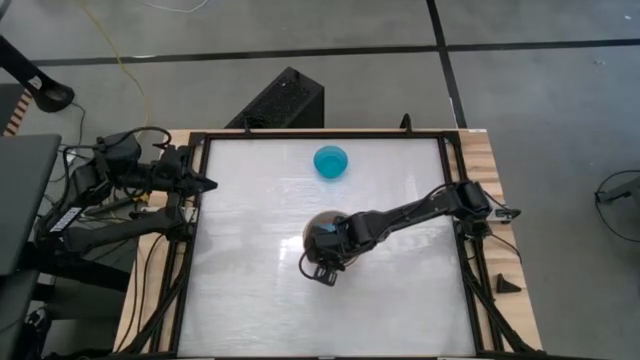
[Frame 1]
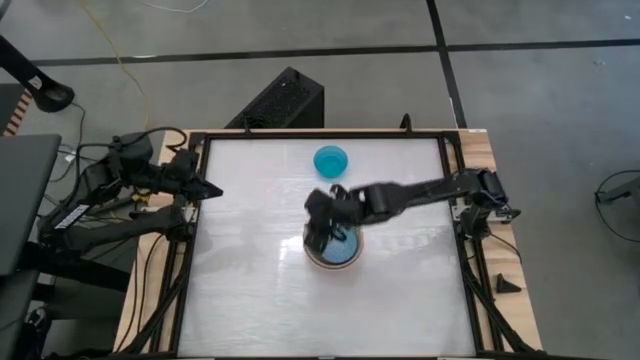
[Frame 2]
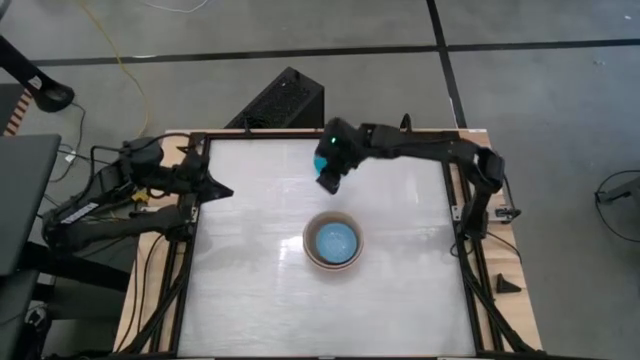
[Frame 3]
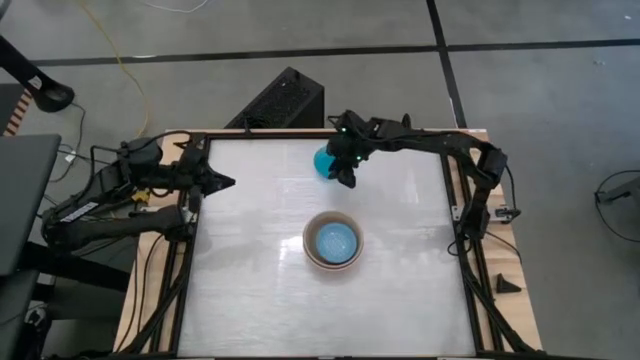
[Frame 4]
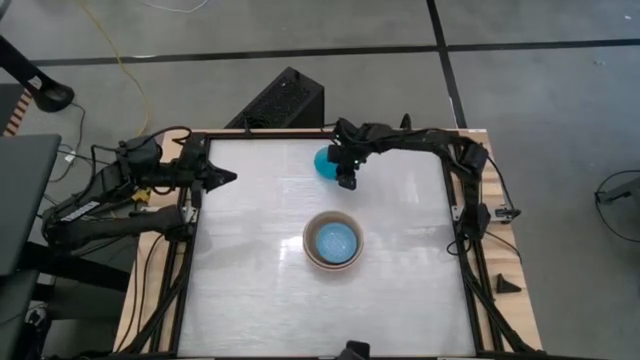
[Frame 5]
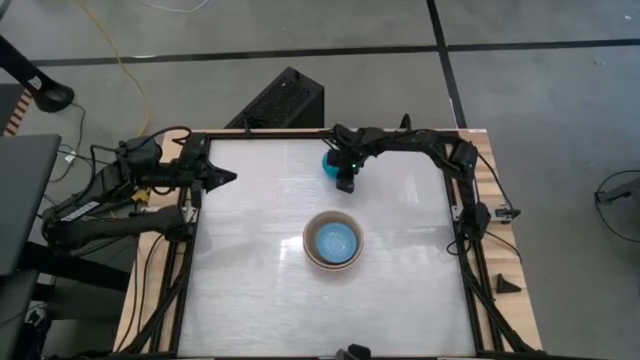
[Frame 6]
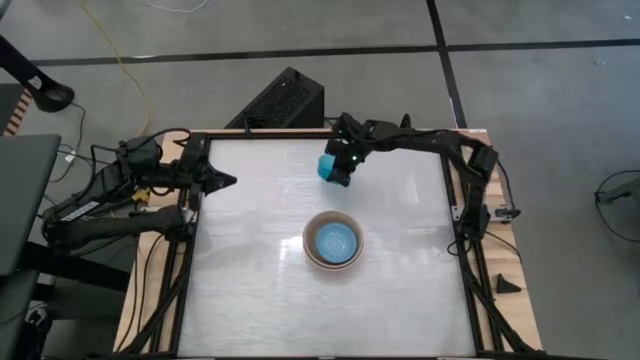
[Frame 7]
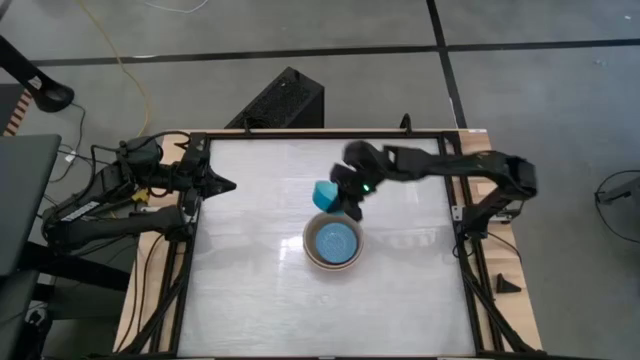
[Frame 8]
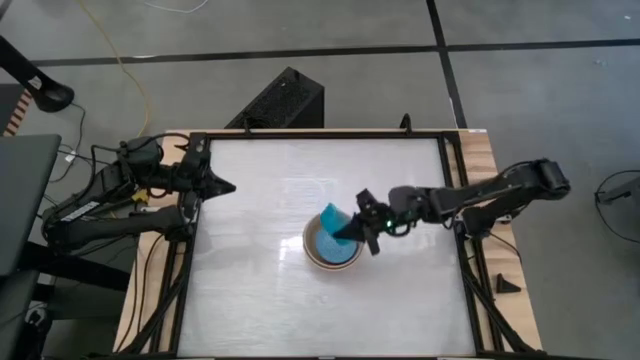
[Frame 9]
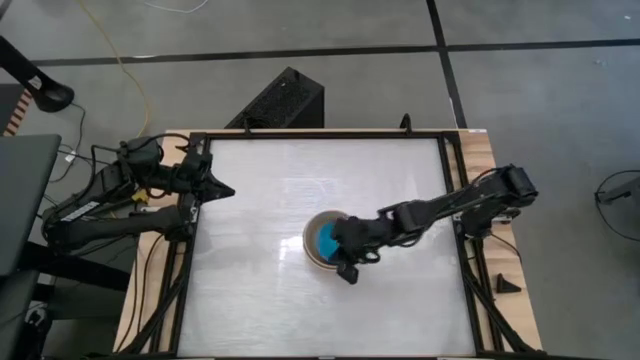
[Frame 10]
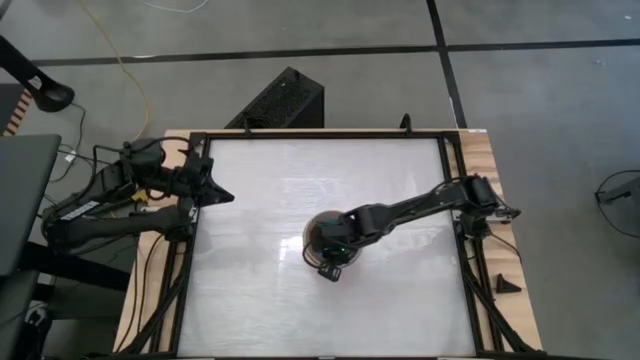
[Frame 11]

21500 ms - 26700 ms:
Stack the transparent blue bowl on top of the blue patterned bowl

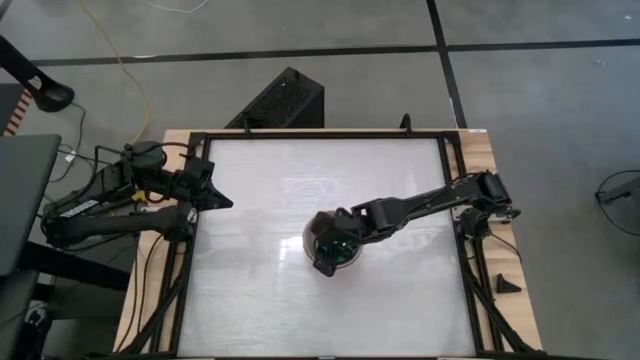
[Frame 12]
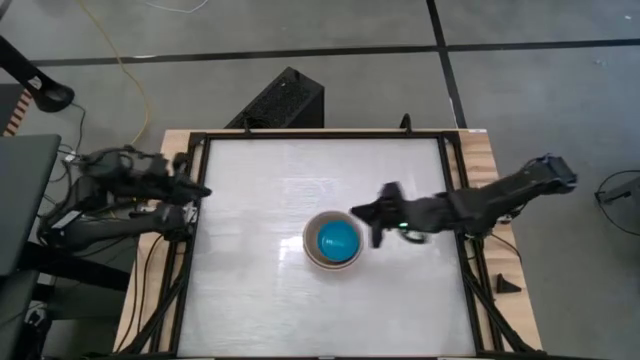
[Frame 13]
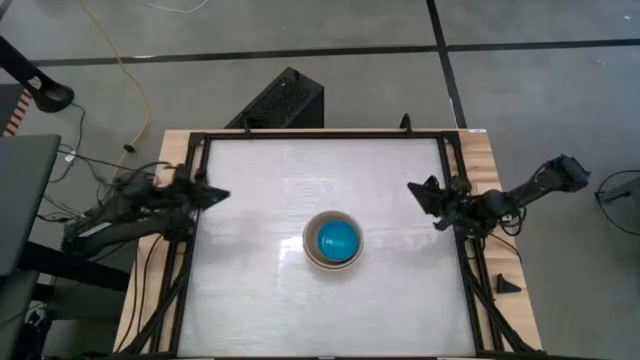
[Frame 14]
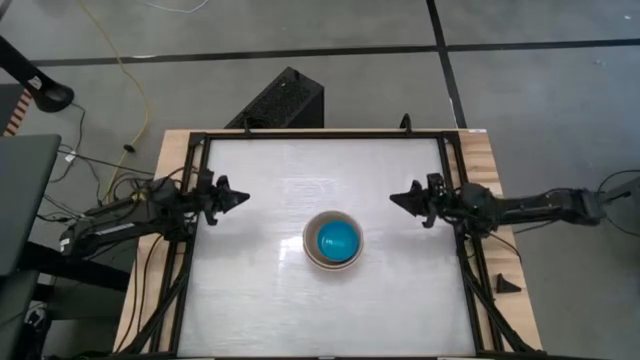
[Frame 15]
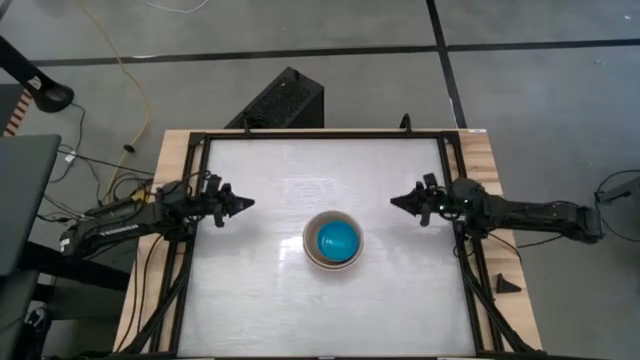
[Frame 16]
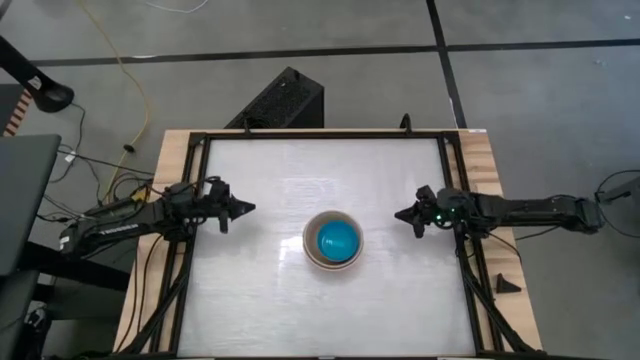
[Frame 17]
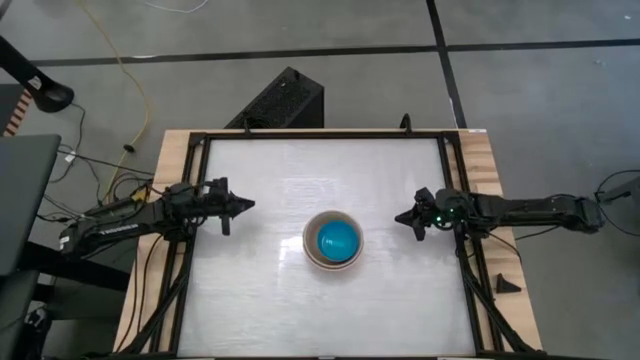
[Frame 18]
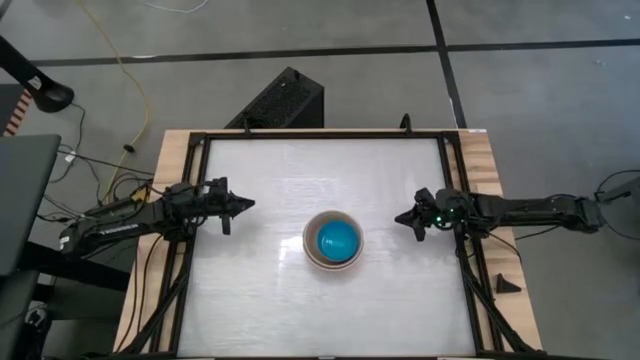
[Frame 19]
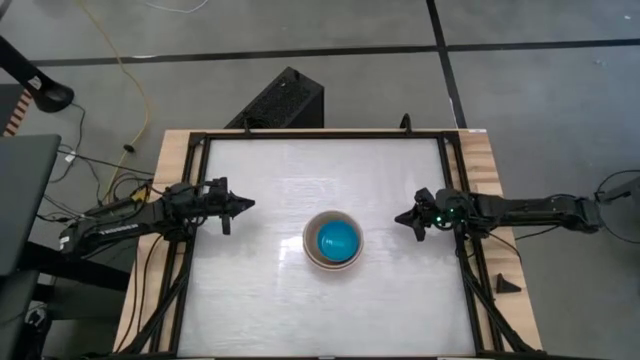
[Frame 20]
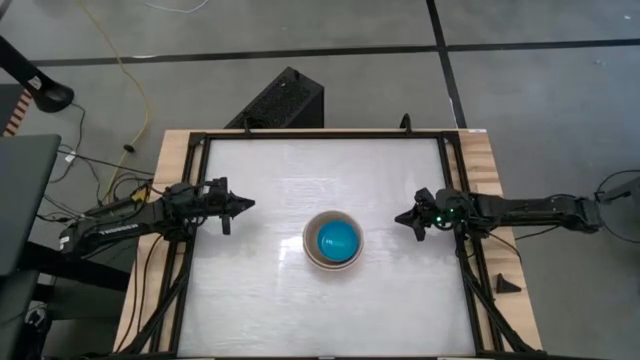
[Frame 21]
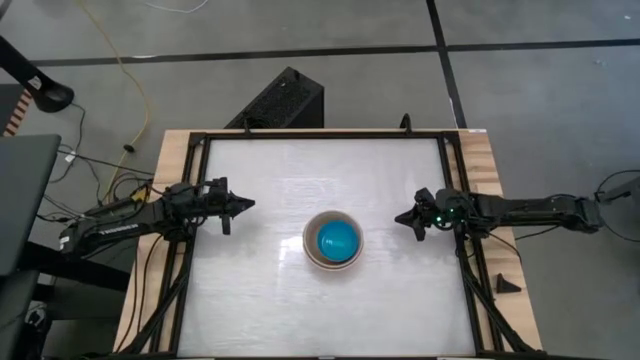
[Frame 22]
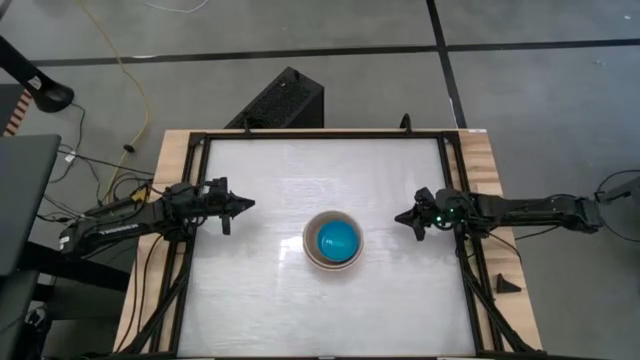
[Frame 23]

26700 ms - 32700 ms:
Return to Home Position

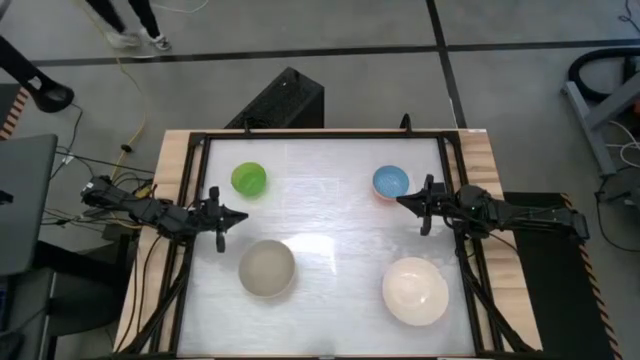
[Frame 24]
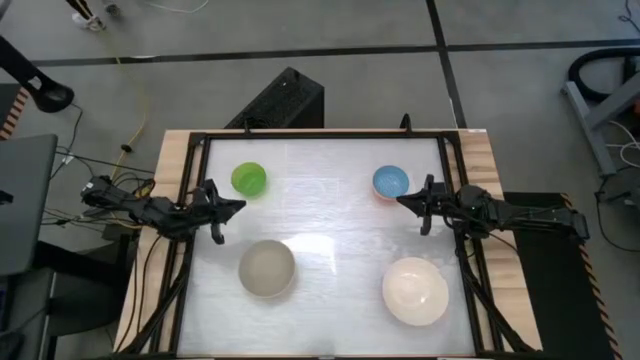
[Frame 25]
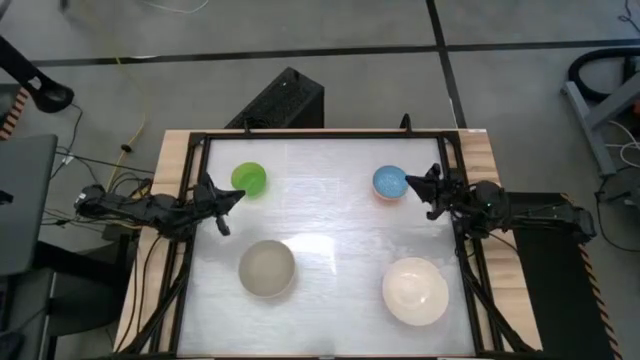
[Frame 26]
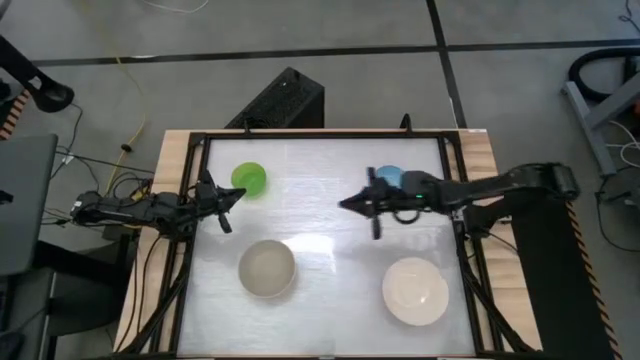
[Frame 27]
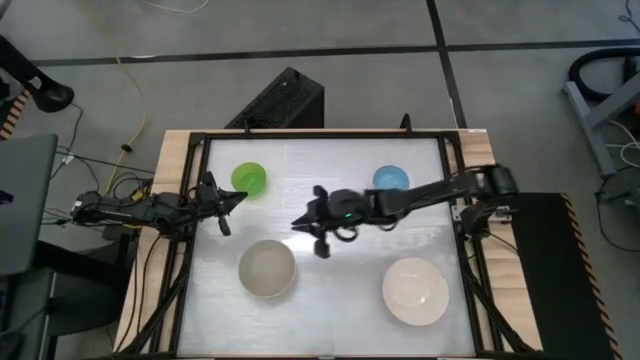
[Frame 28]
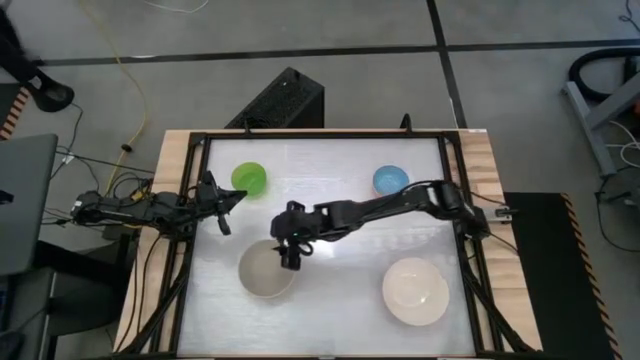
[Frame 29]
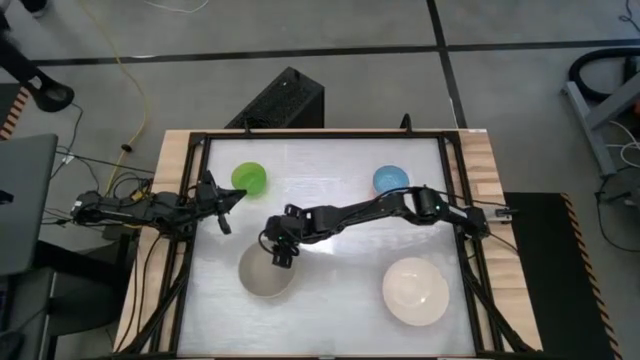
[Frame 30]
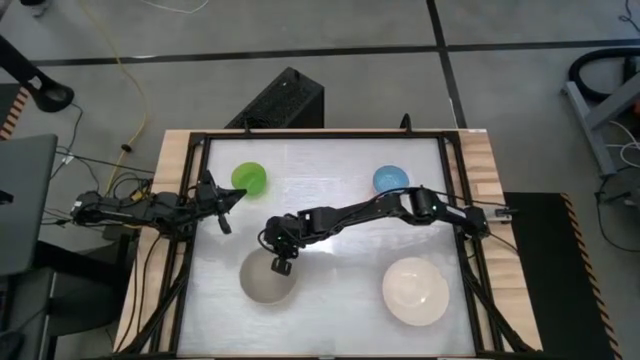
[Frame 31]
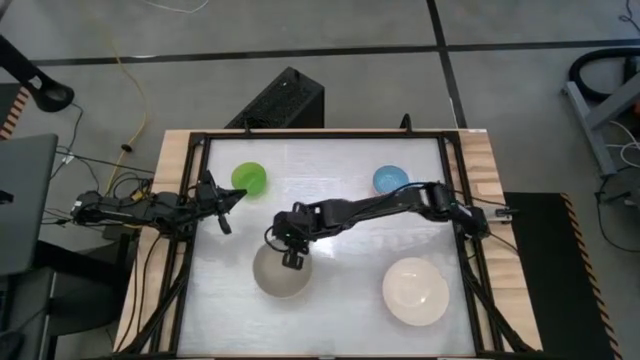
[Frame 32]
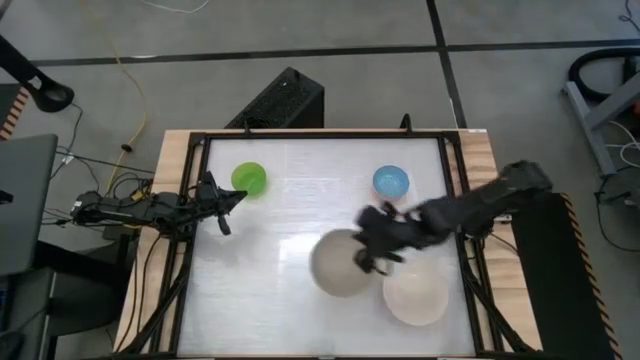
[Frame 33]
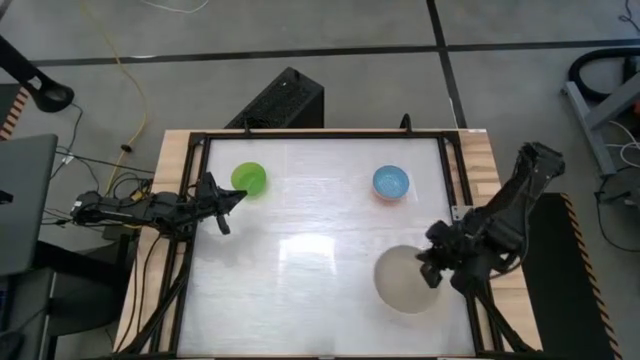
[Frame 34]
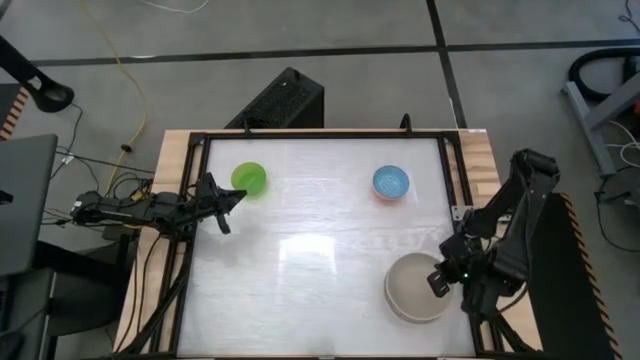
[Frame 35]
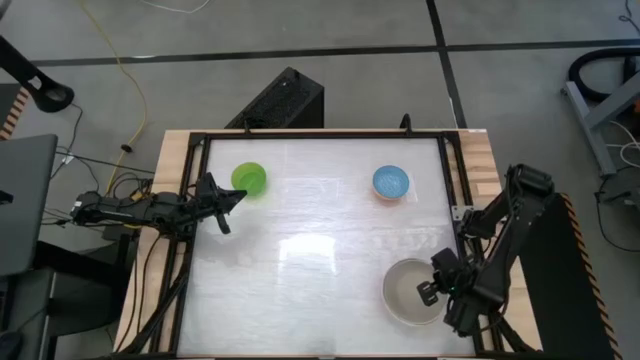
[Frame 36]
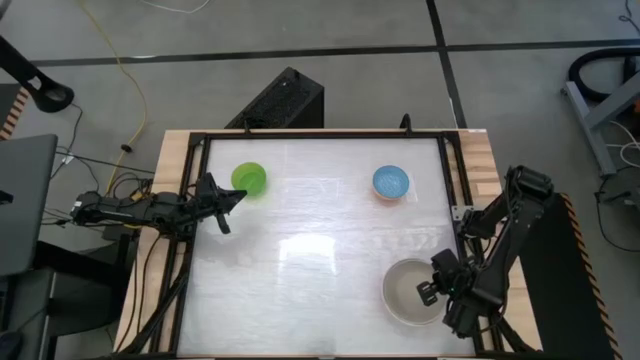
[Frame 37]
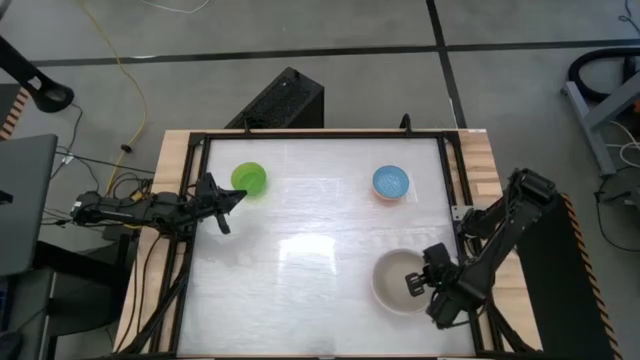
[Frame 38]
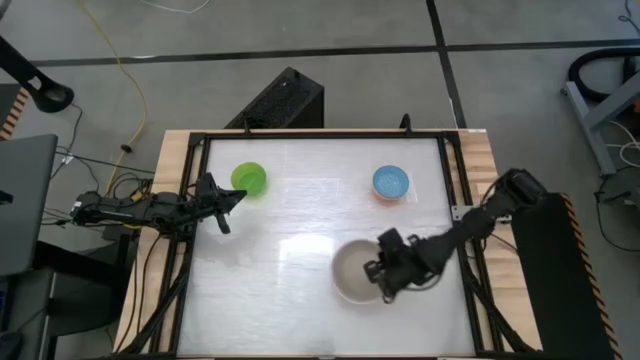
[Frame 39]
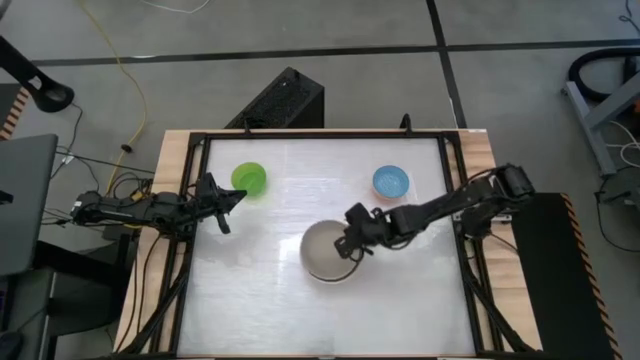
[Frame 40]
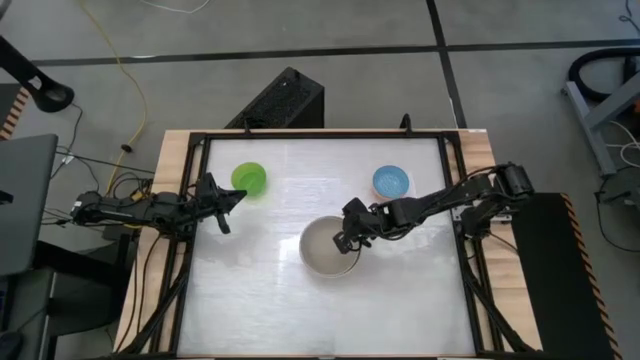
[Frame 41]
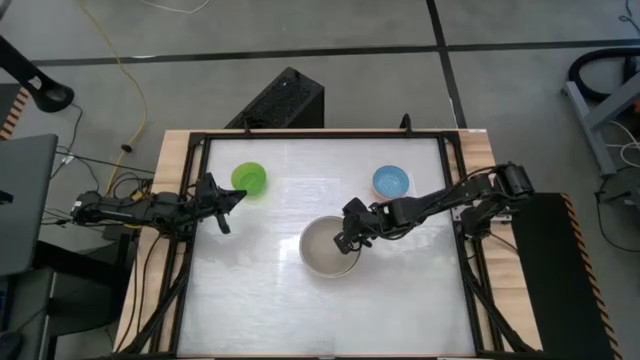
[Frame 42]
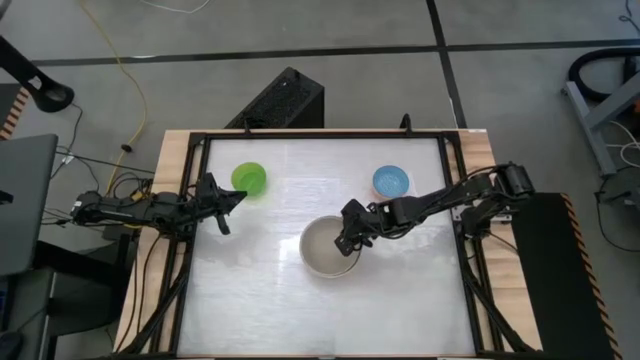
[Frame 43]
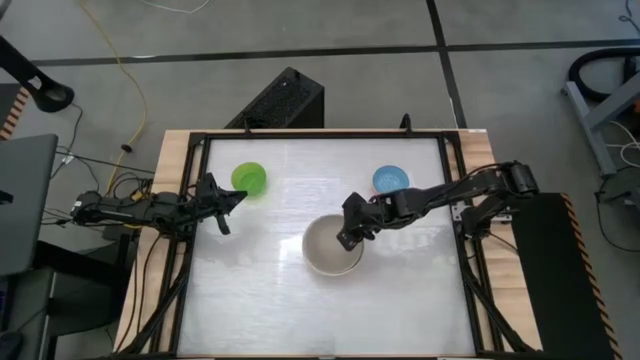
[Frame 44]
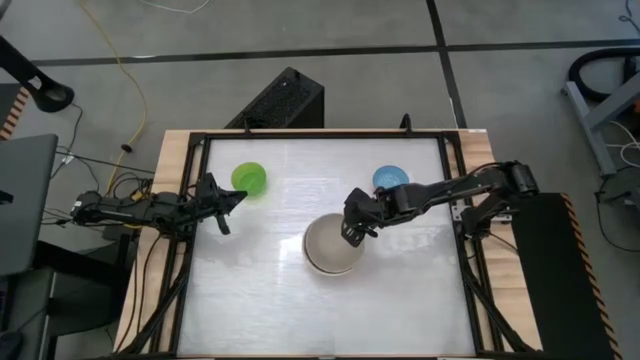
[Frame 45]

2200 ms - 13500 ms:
Stack the gray bowl on top of the white bowl
